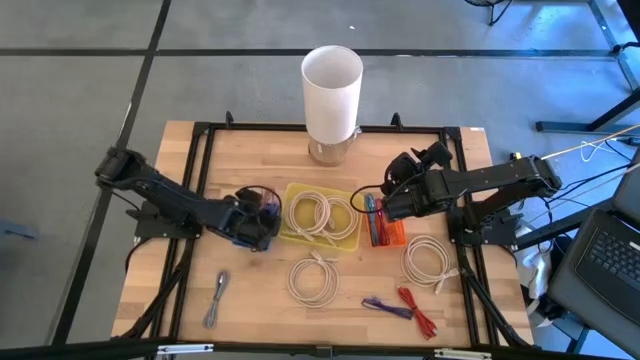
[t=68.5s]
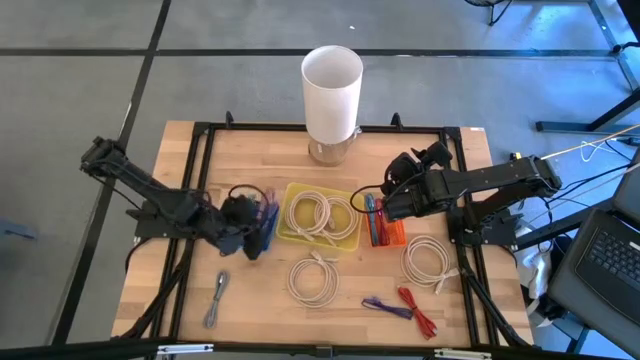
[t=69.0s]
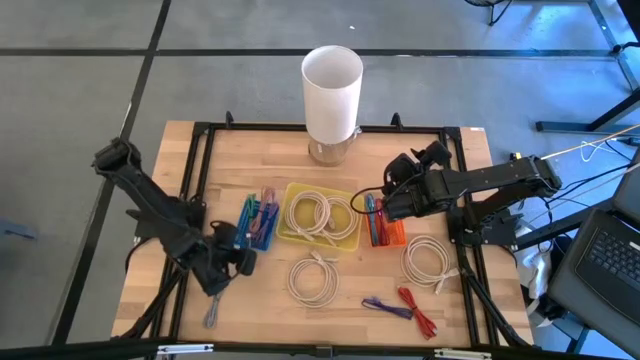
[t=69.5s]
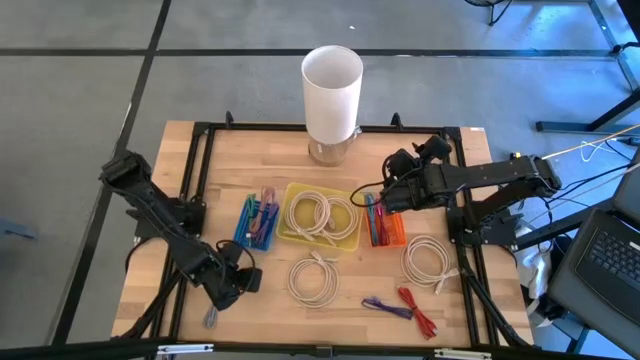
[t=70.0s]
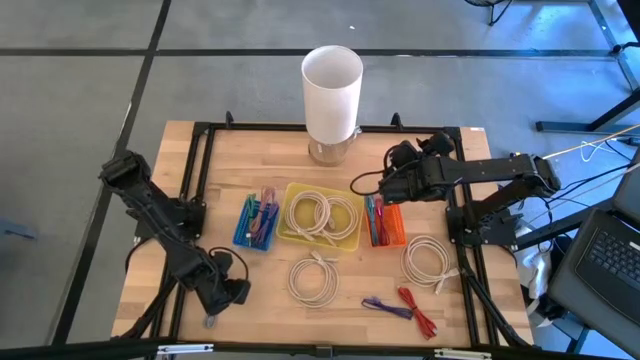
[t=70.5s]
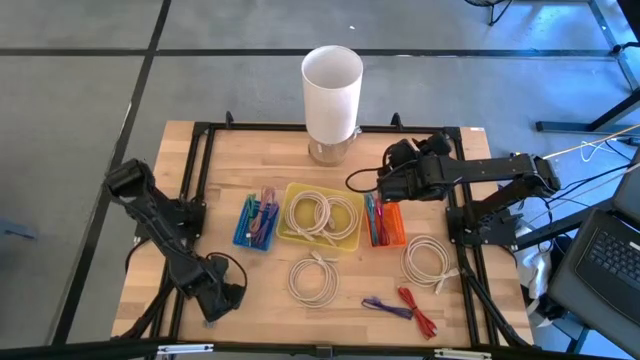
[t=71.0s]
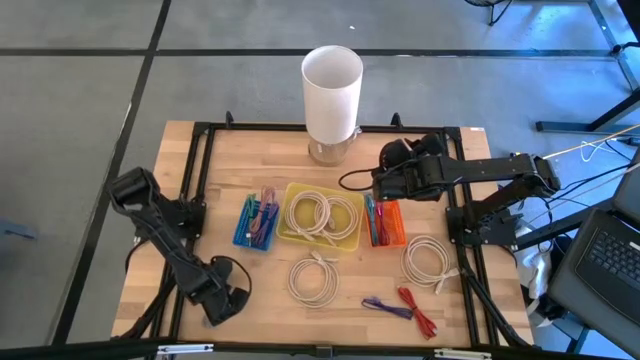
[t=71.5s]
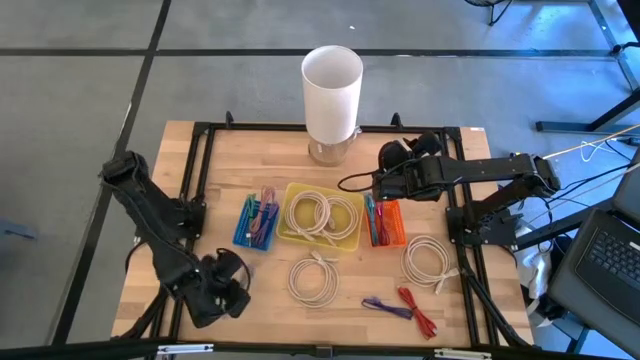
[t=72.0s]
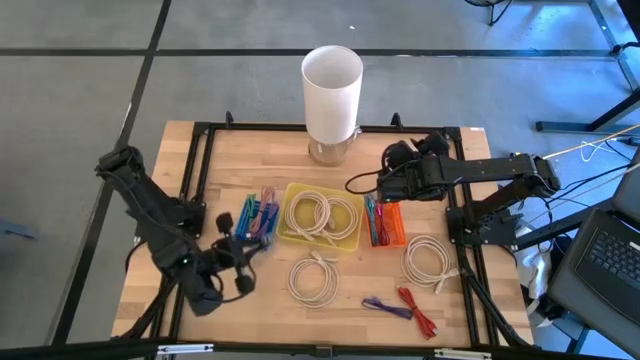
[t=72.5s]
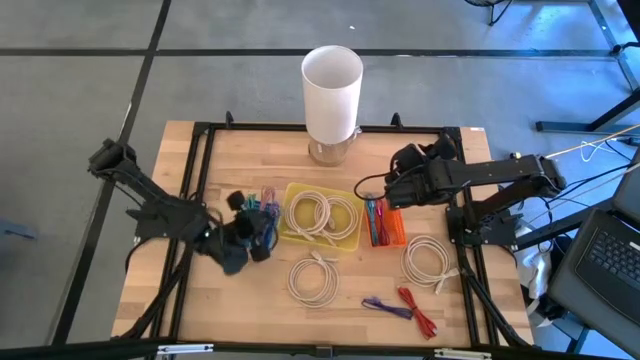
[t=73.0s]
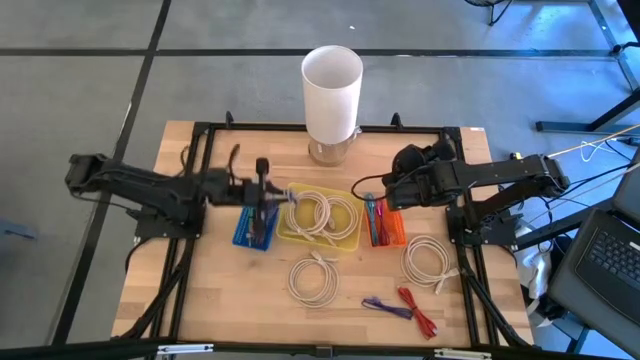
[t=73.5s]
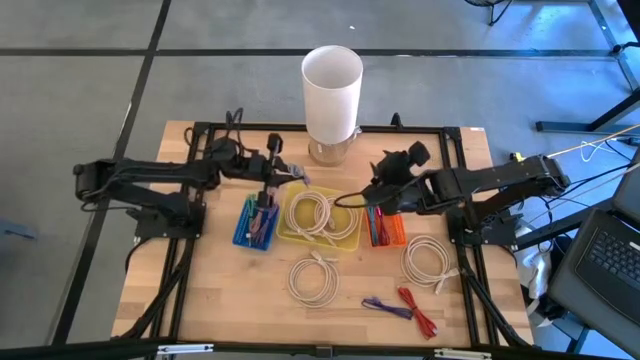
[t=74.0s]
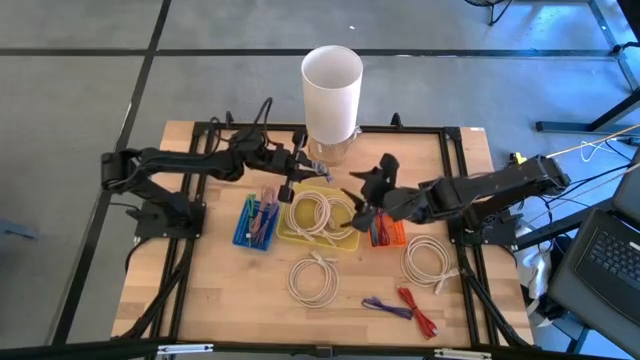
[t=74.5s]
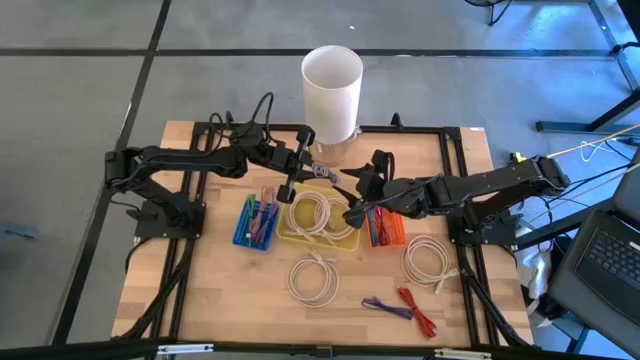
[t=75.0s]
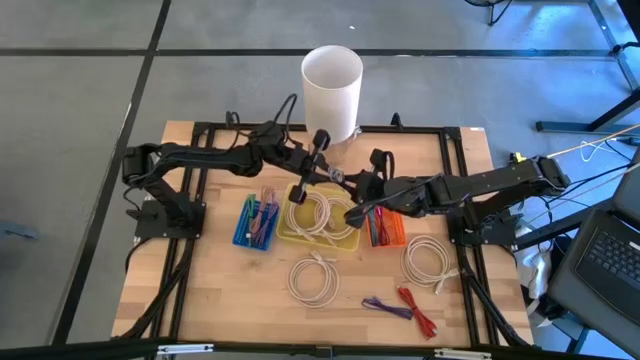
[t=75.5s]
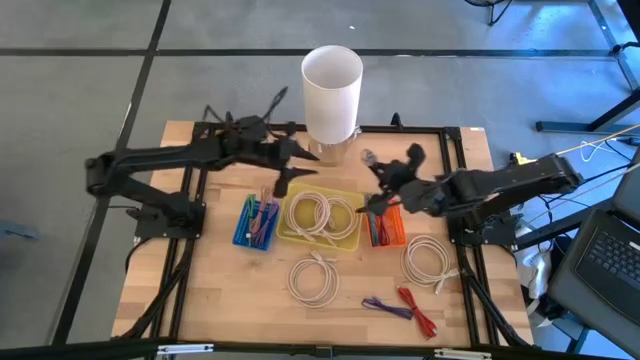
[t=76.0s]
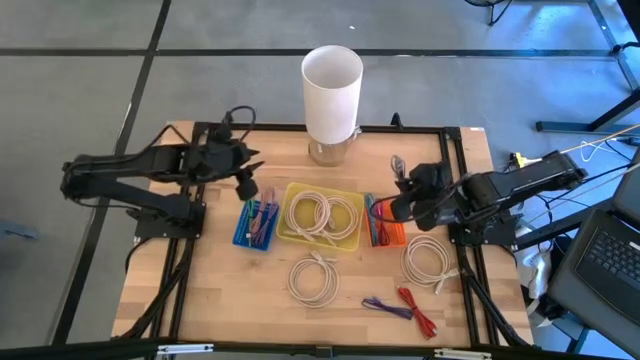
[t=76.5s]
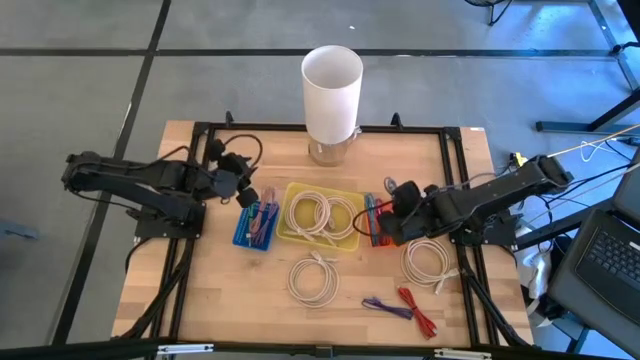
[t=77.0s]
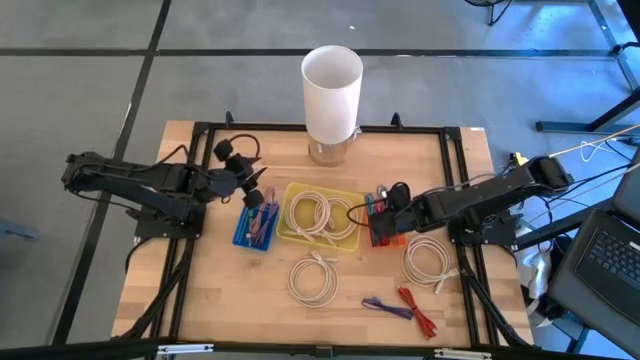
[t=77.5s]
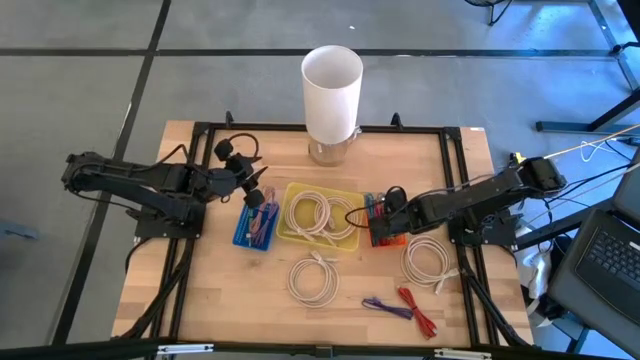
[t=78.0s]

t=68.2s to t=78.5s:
Task: Pick & Place USB Port
Put the white patterned USB cable into the orange bin

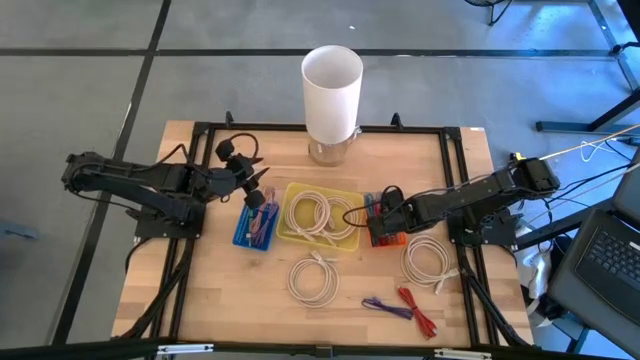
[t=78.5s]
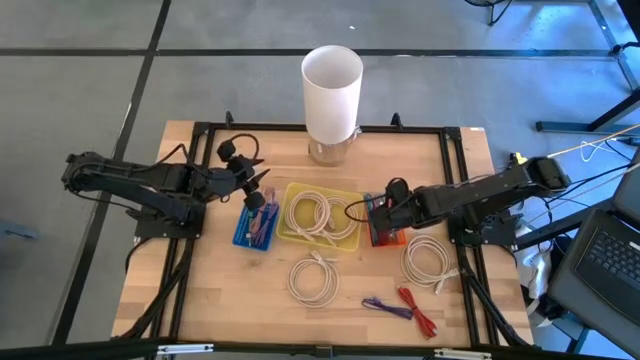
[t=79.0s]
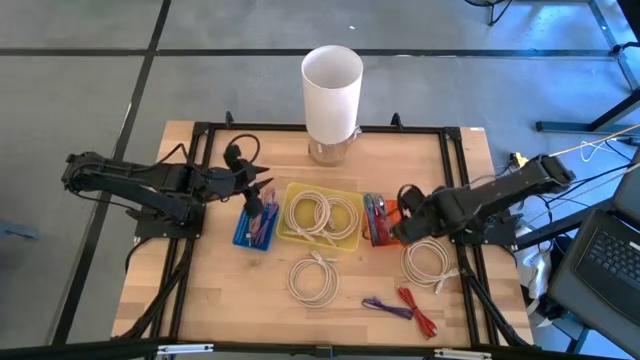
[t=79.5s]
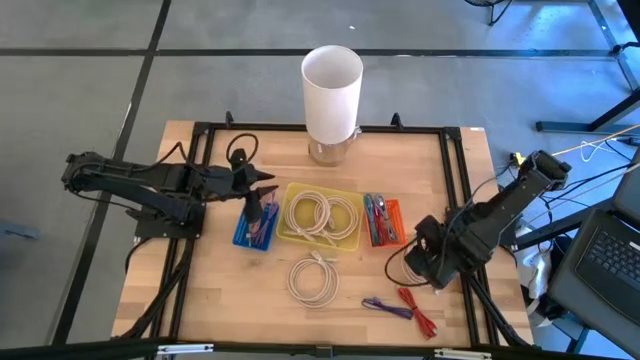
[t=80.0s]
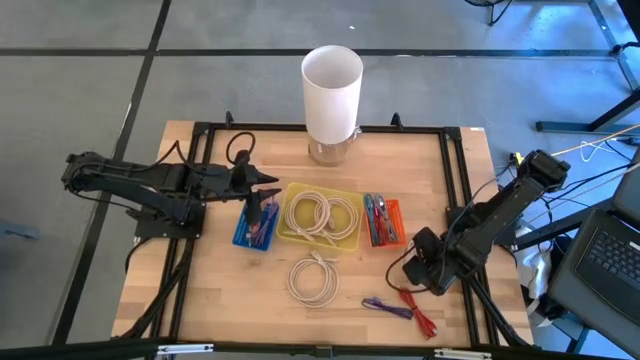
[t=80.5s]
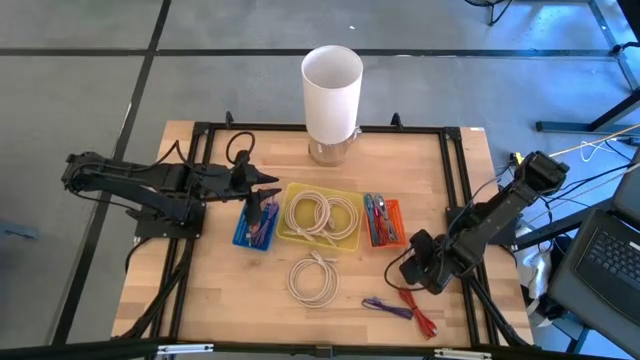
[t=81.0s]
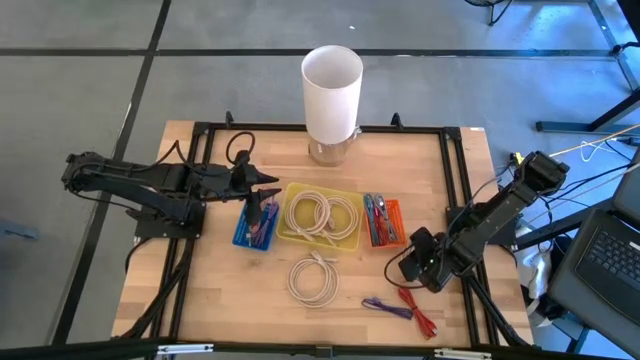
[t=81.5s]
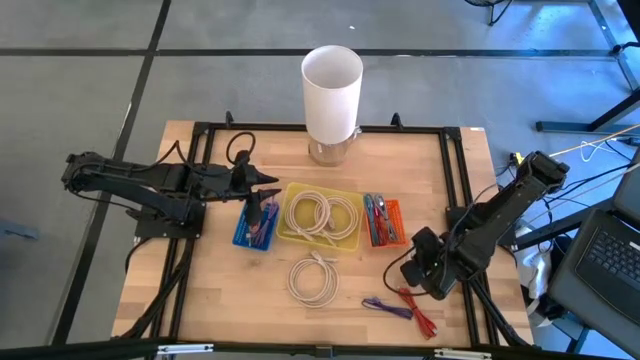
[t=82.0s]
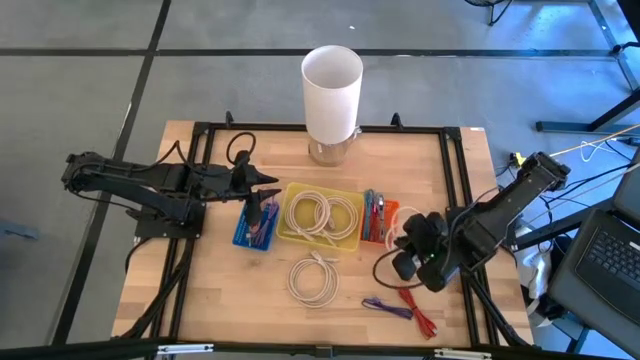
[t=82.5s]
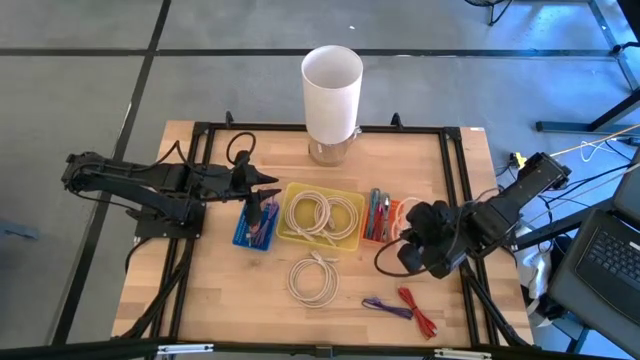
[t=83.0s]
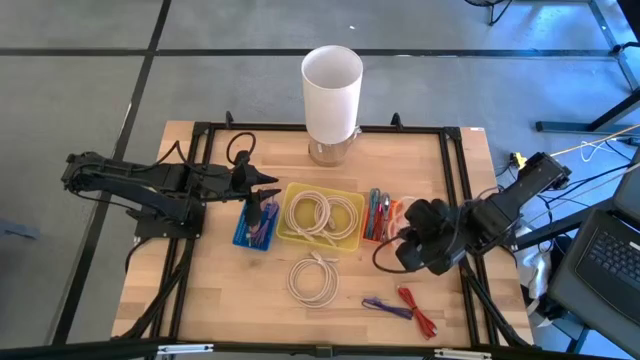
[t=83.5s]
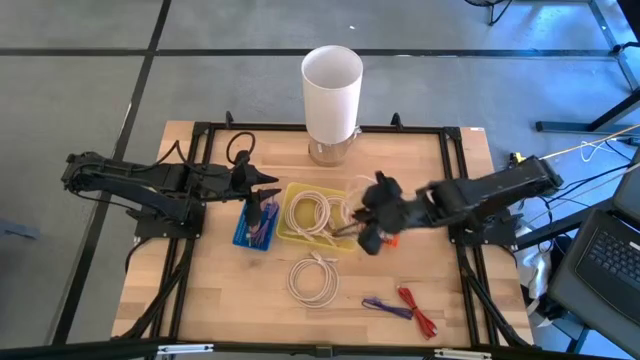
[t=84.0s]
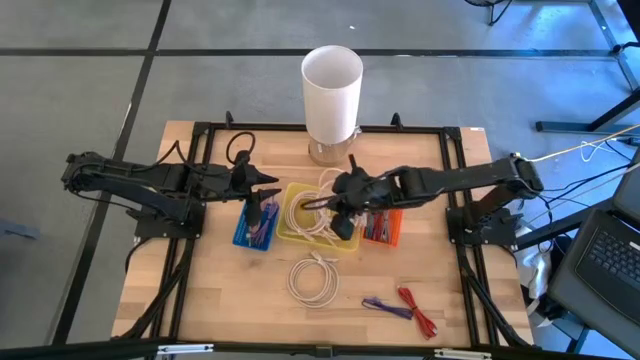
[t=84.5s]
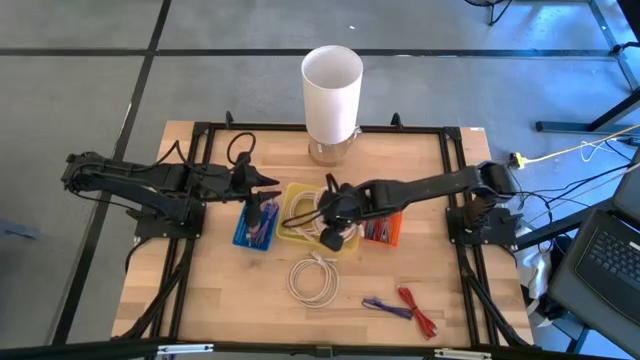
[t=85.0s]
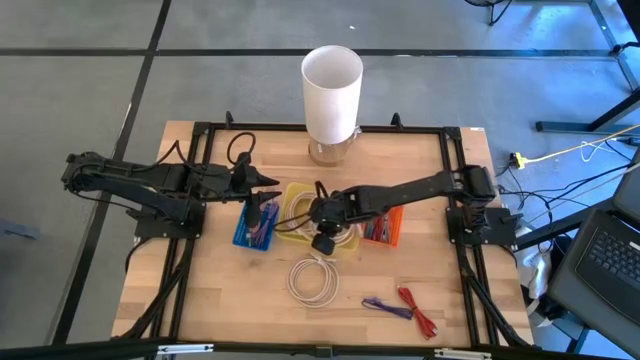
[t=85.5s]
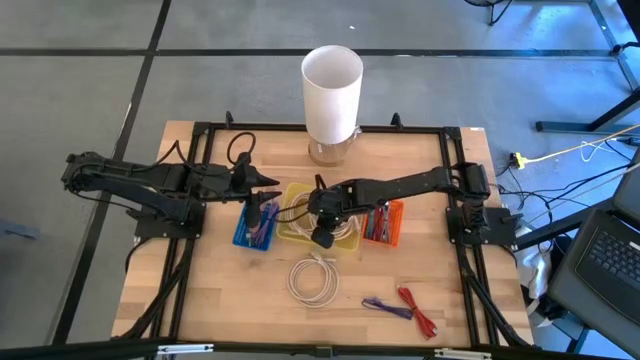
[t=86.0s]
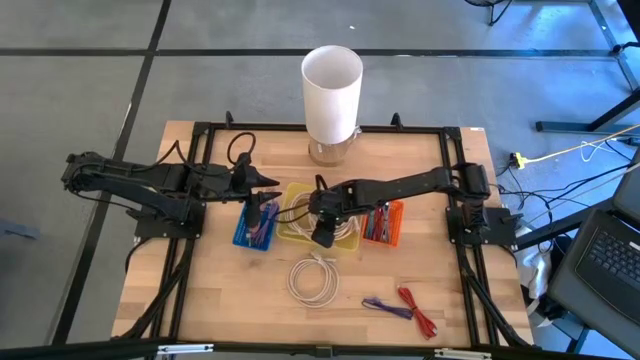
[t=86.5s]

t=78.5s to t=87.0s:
Put the light brown HDMI cable into the yellow bin

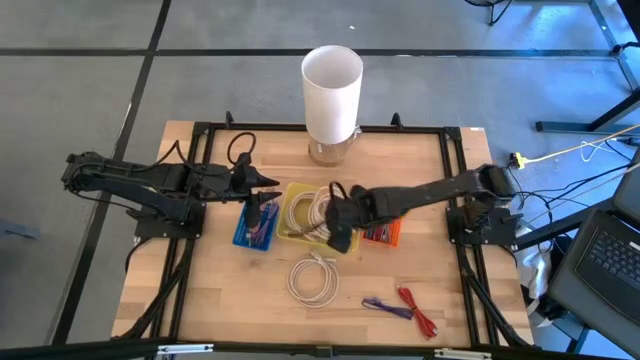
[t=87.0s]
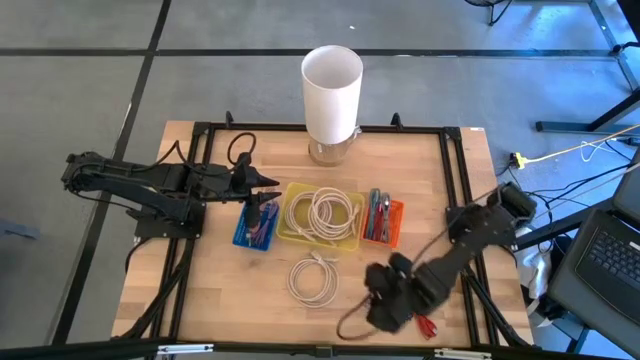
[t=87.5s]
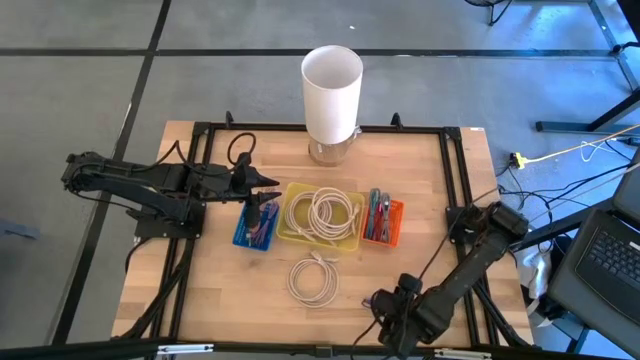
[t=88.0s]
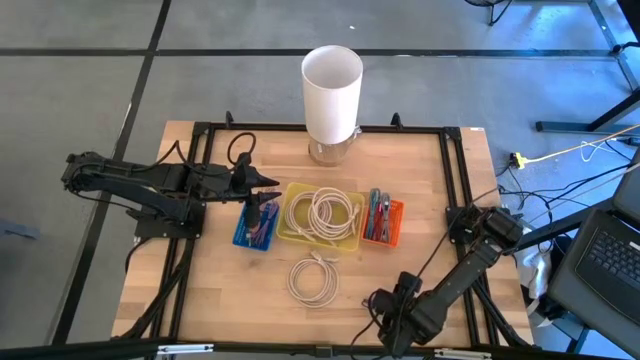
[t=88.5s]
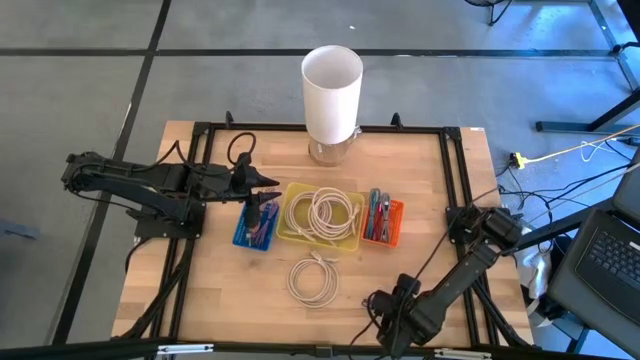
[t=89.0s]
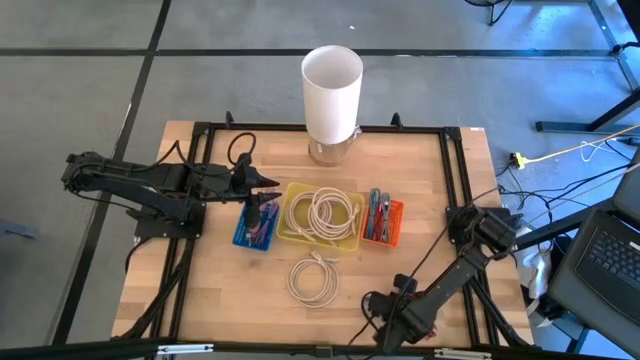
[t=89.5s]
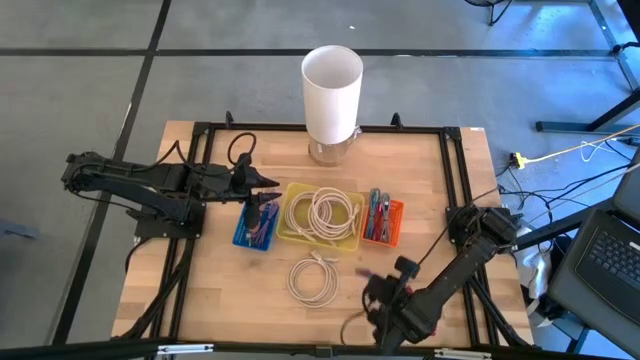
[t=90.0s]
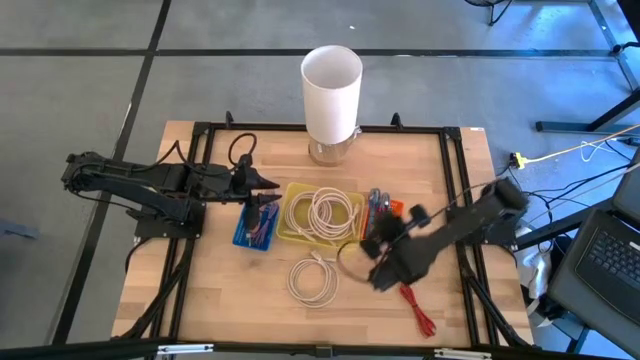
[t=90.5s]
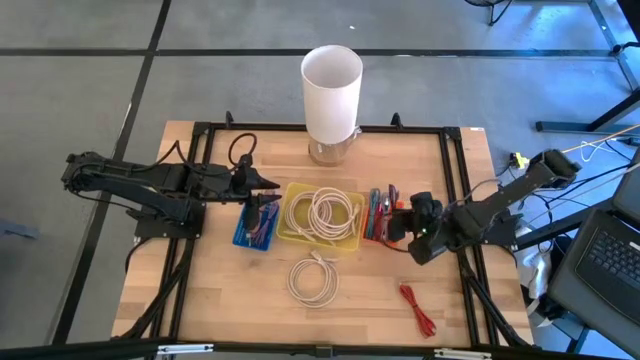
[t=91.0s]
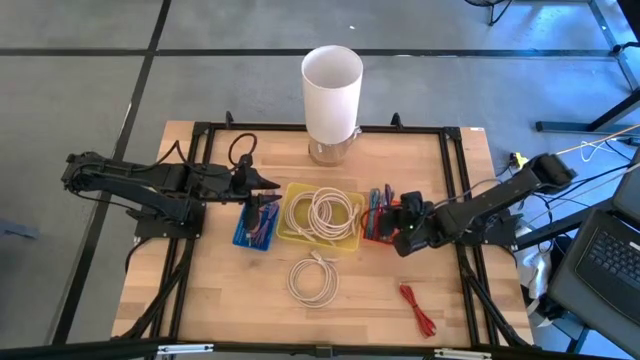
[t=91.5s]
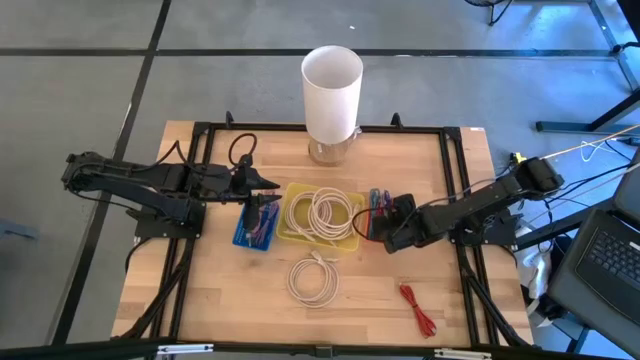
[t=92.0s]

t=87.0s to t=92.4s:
Put the dark blue patterned USB cable into the orange bin
